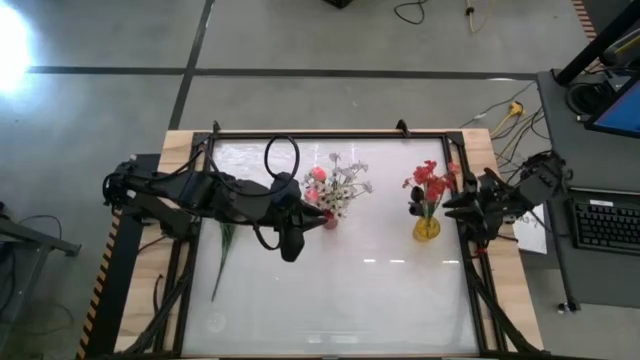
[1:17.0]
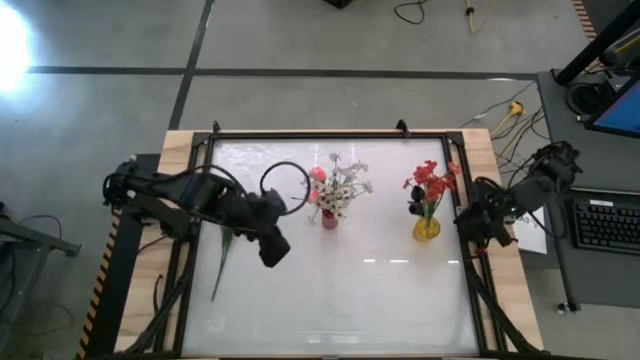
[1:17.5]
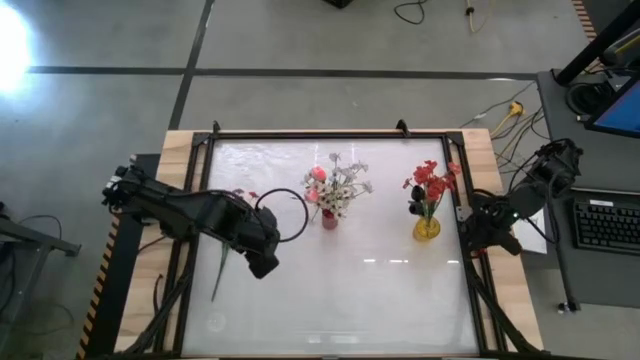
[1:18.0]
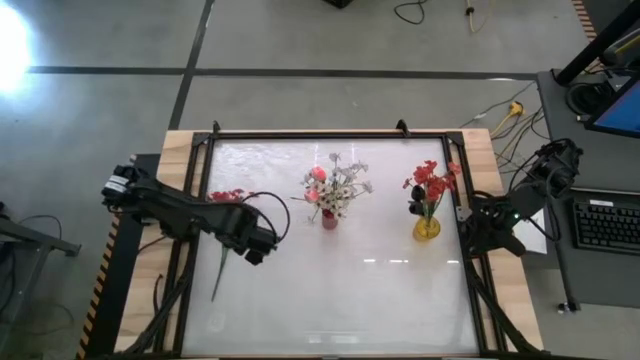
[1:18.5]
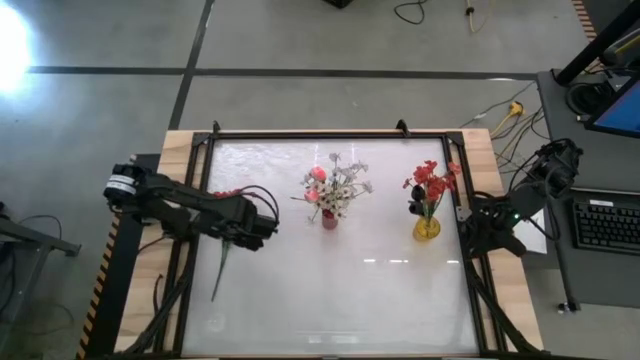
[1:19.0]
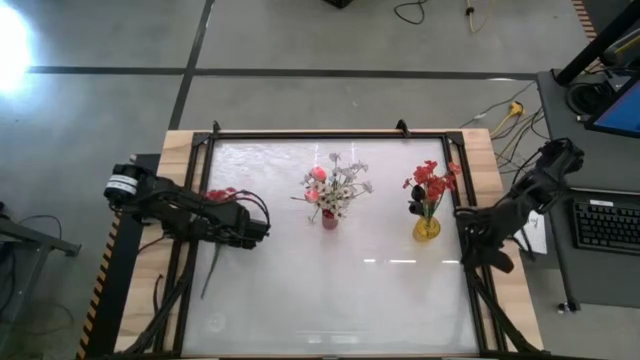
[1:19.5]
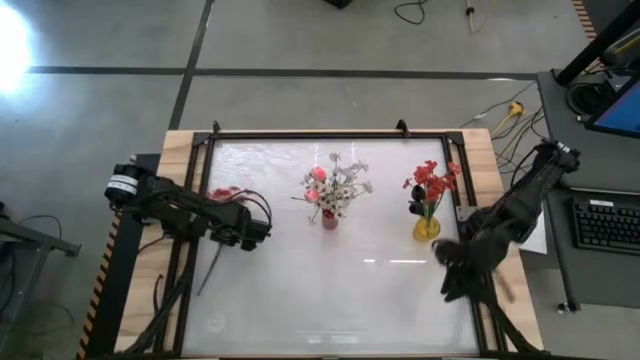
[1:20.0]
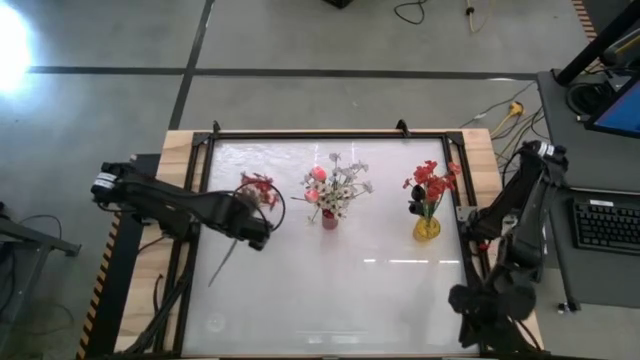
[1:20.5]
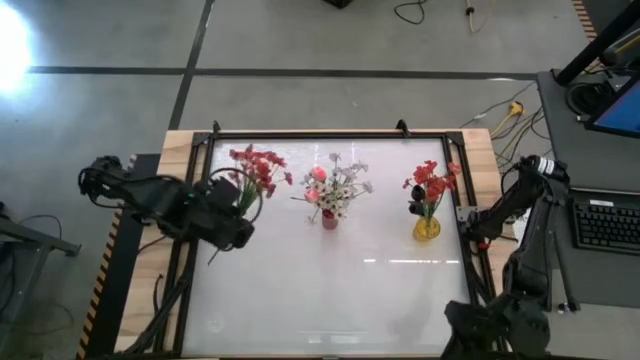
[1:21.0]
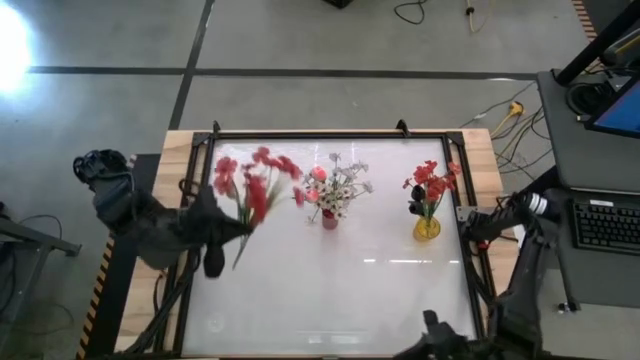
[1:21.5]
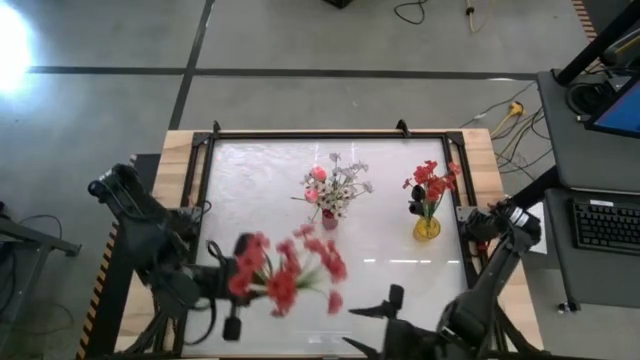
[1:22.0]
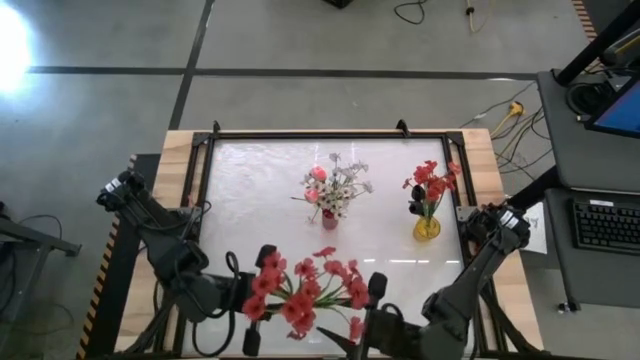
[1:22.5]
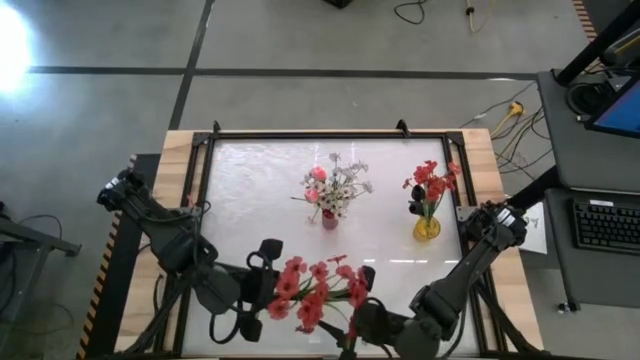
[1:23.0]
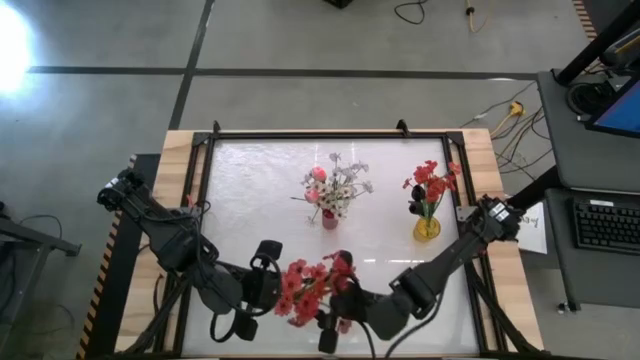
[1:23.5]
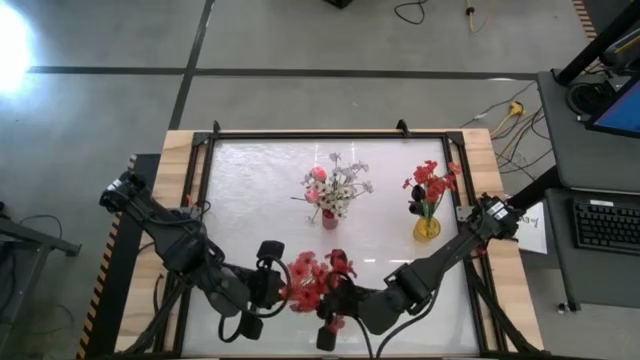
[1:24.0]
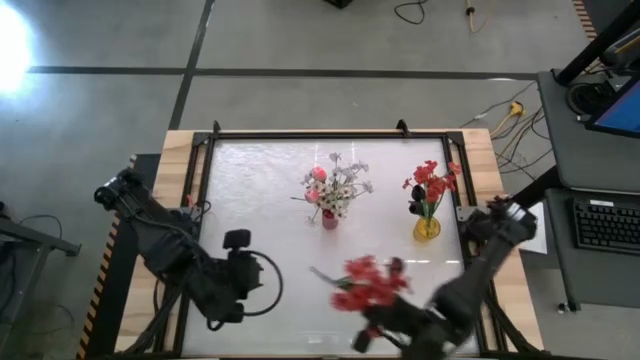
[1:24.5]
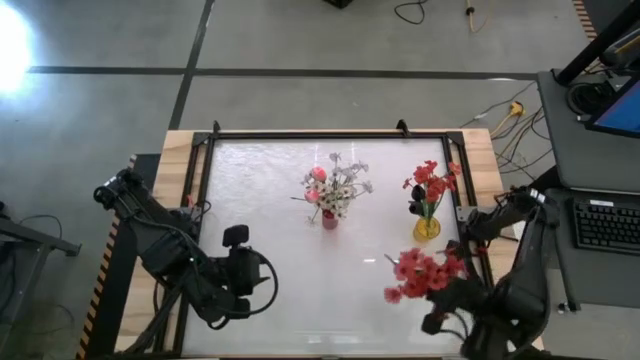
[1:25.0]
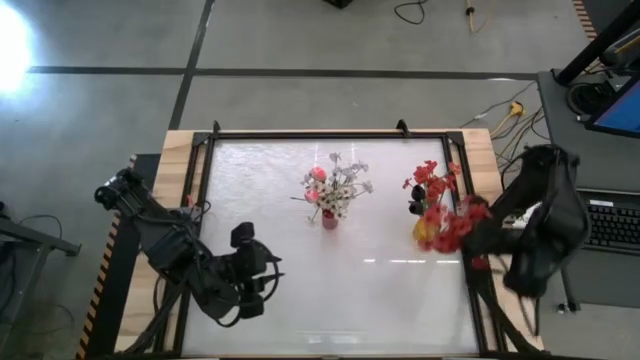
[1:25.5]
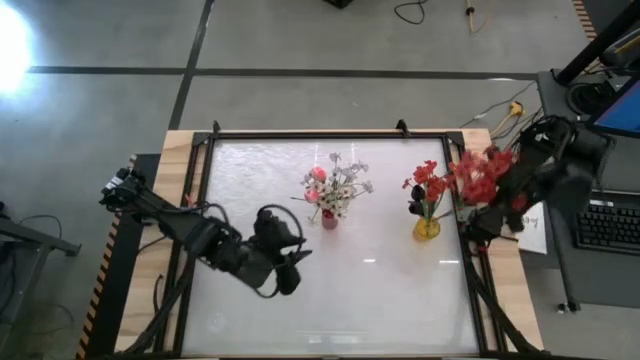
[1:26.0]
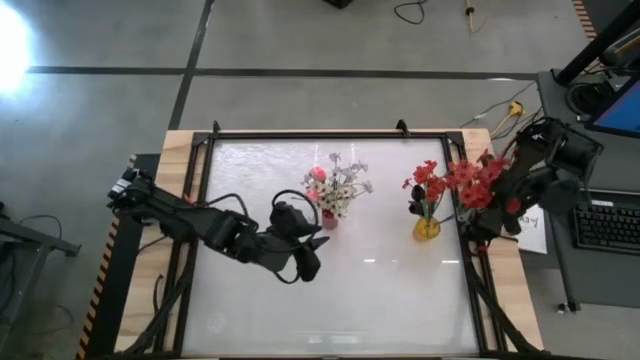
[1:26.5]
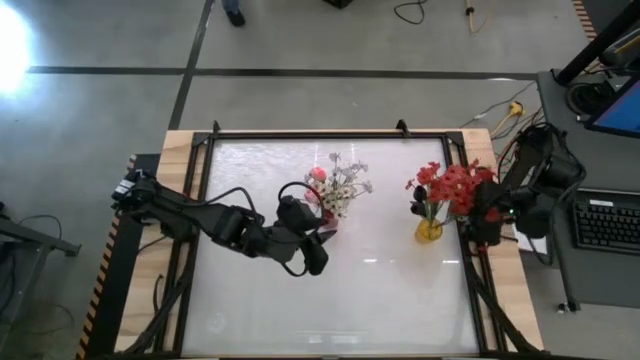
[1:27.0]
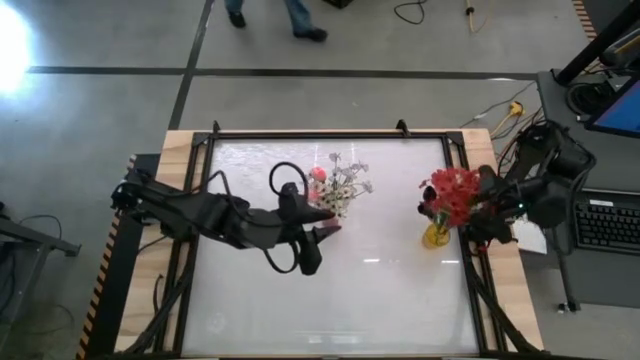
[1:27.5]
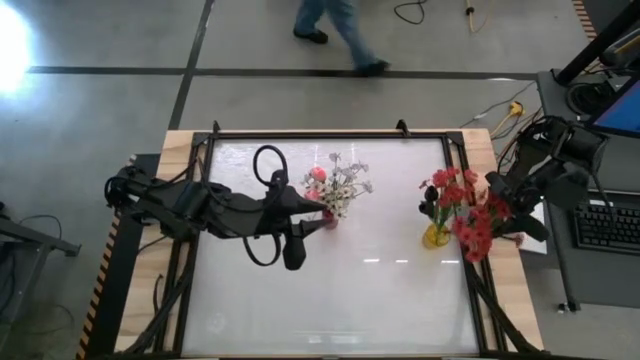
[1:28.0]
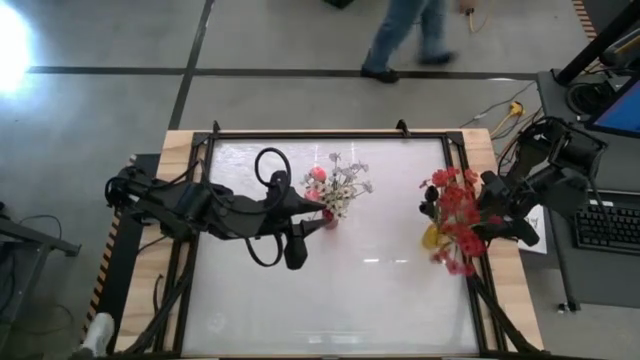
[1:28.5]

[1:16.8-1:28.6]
Task: Sort flowers into vase by color
Put the red flowers into the yellow vase

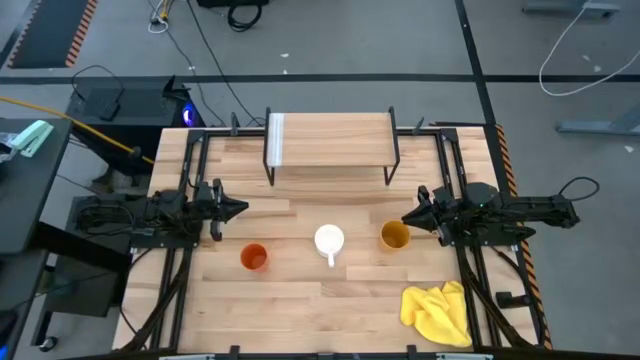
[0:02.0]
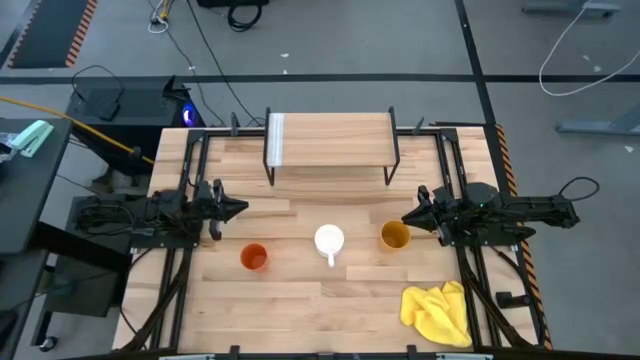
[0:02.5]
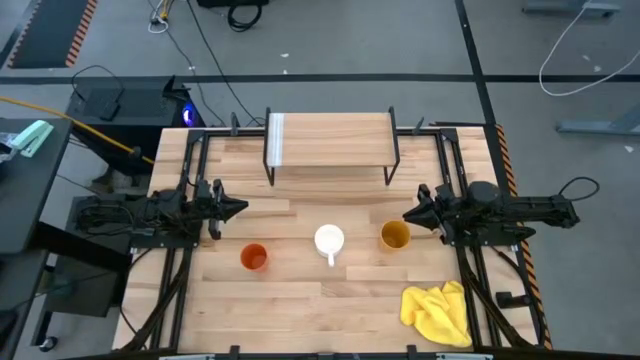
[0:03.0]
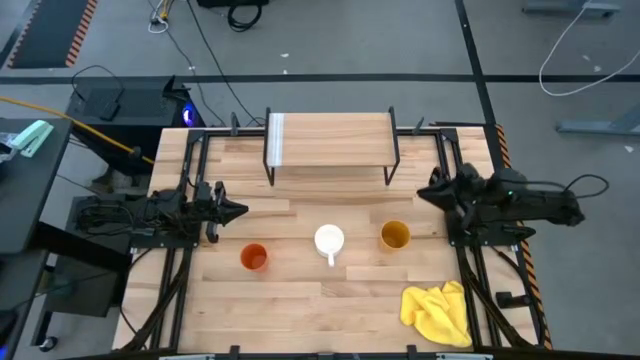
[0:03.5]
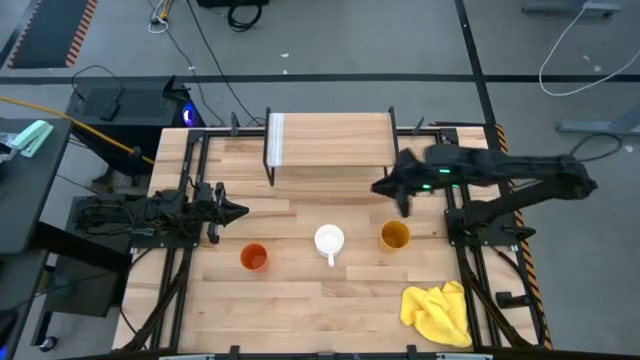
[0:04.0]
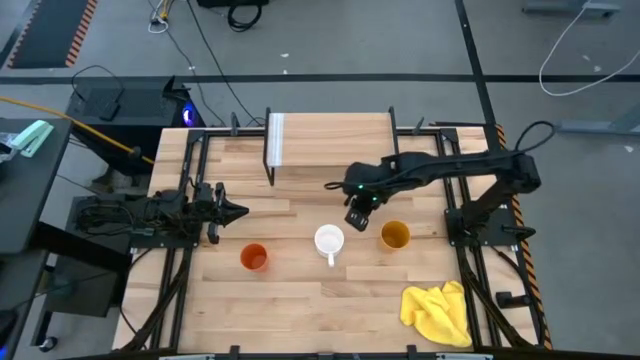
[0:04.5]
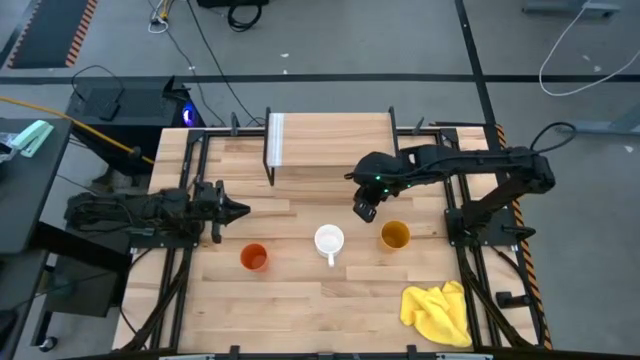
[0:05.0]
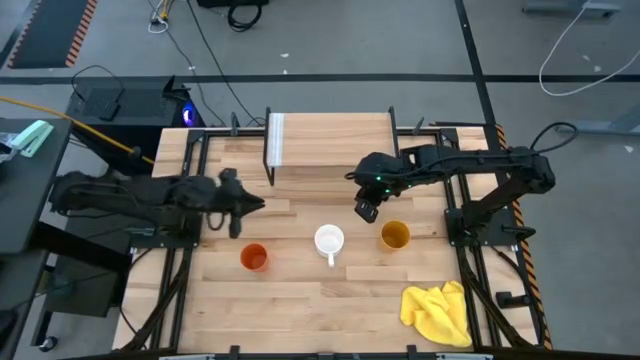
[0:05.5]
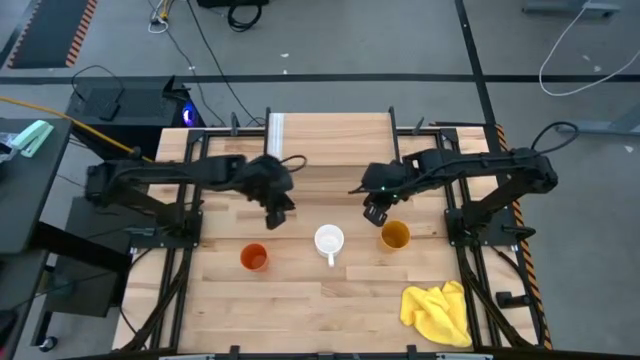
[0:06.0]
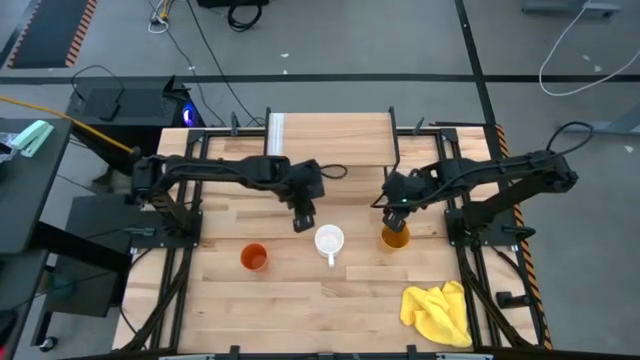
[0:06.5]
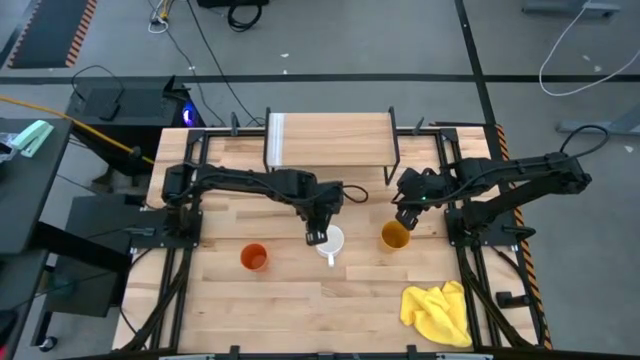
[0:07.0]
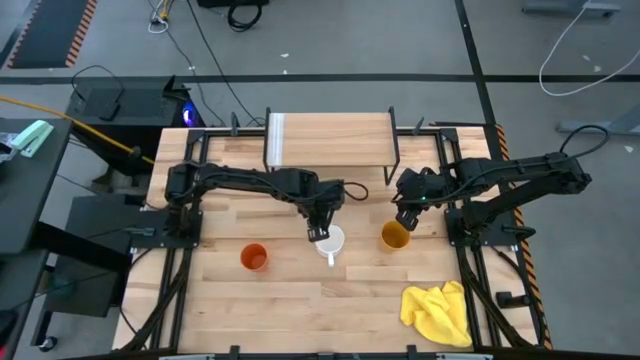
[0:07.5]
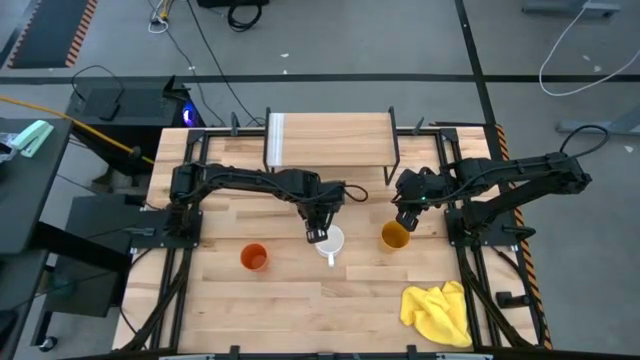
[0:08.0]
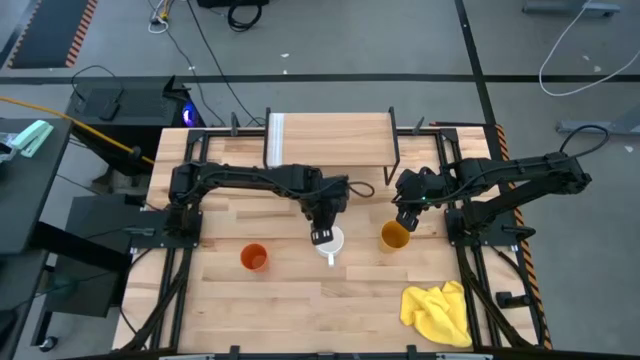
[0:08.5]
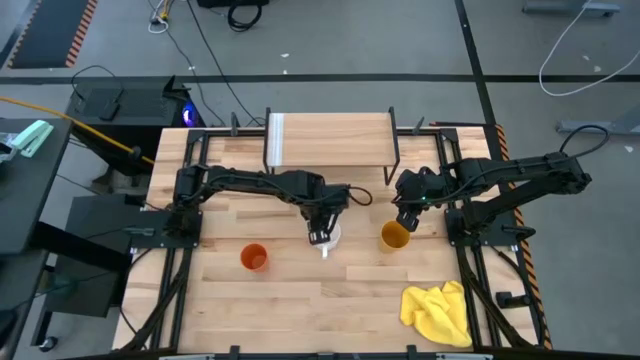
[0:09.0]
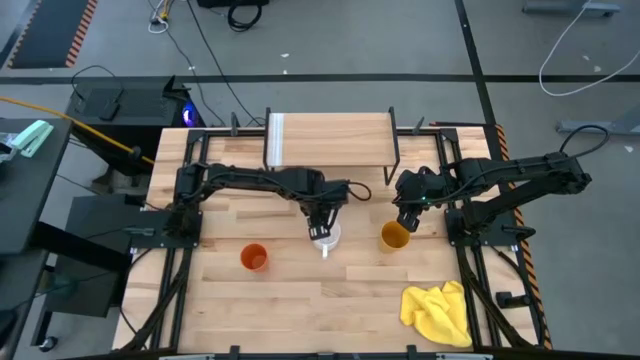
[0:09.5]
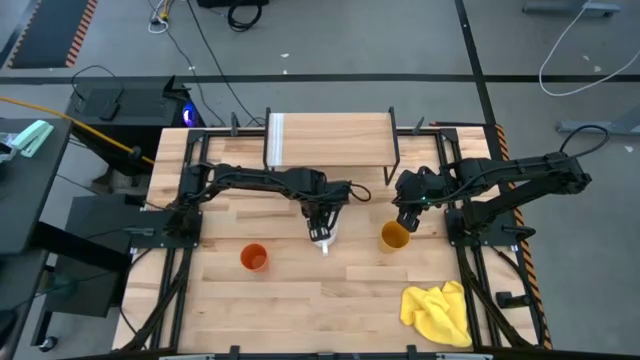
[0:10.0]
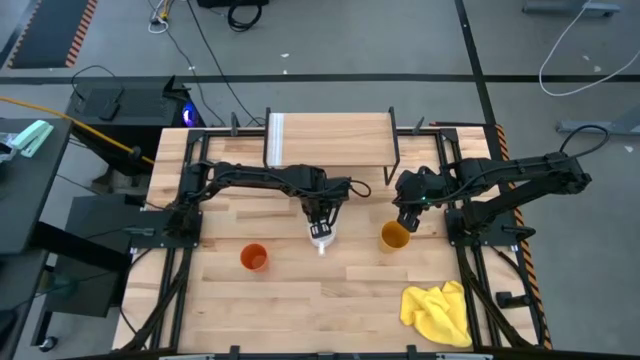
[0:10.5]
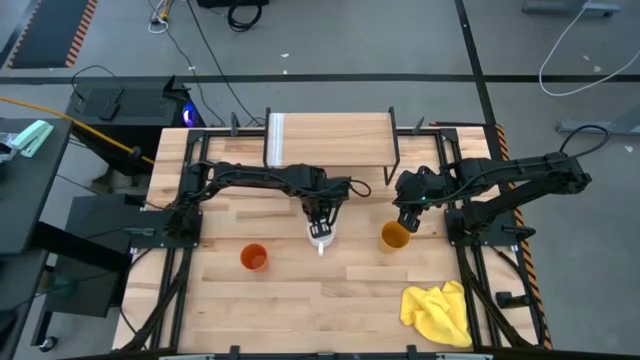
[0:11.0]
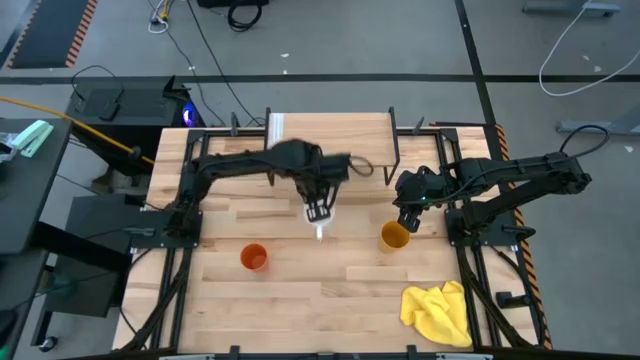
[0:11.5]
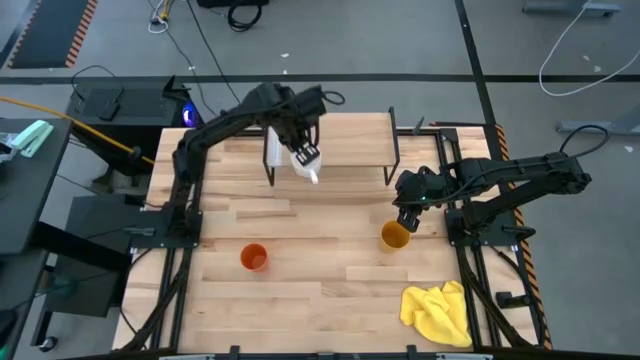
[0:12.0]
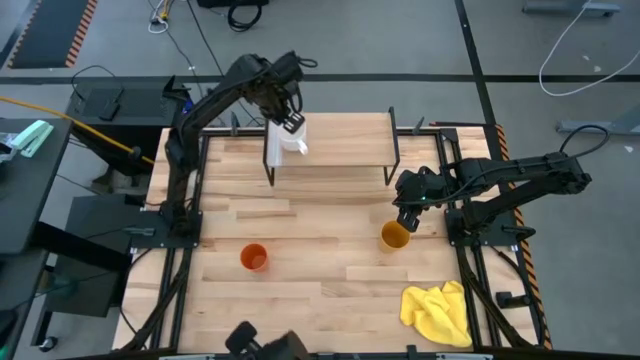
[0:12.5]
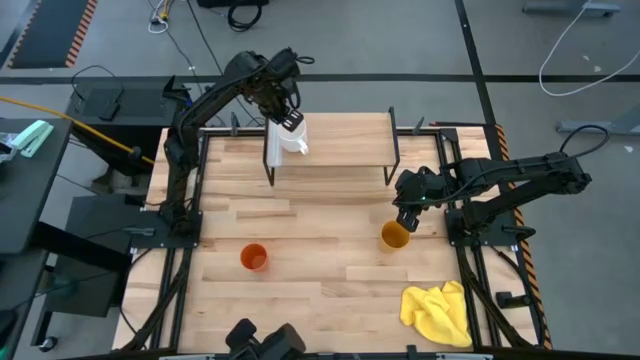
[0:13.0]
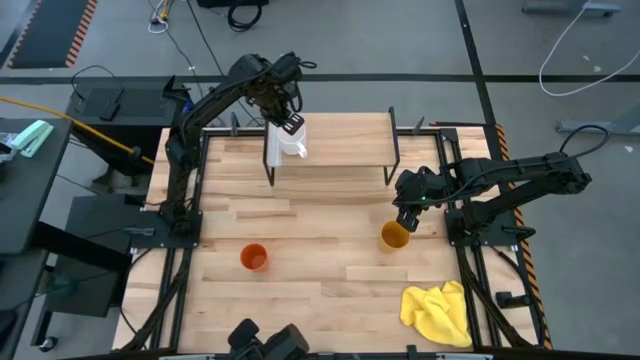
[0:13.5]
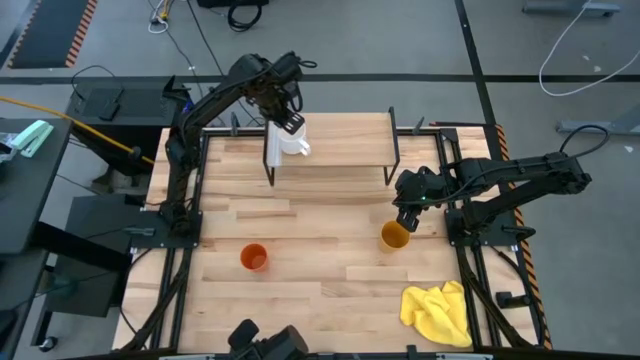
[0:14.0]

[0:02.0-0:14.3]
Task: Stack small to large cups/mugs on shelf
Put the white mug on the shelf
